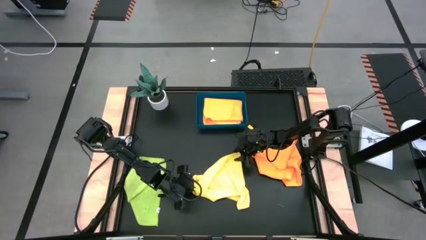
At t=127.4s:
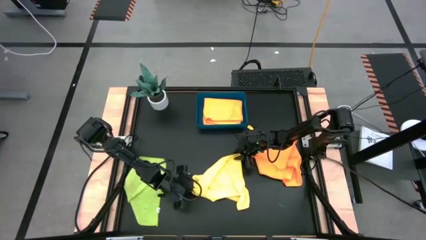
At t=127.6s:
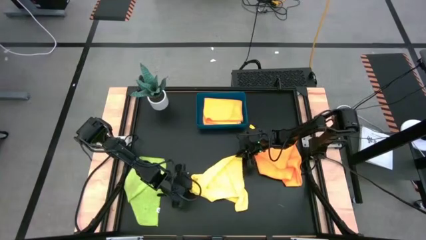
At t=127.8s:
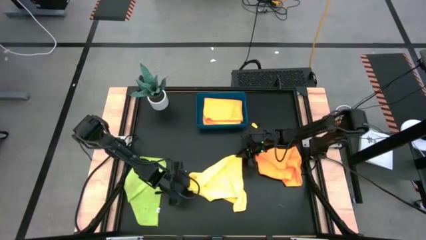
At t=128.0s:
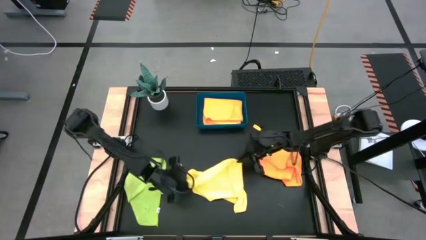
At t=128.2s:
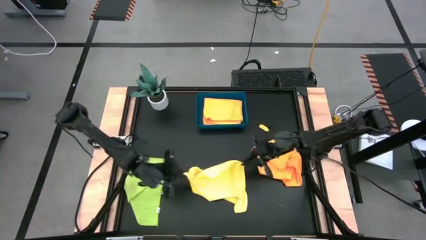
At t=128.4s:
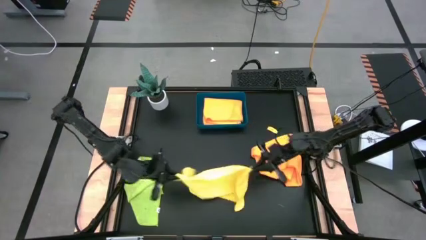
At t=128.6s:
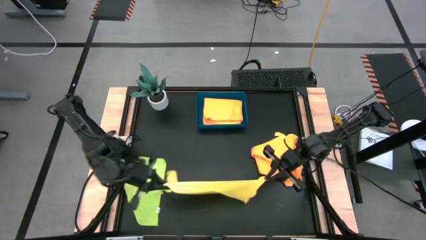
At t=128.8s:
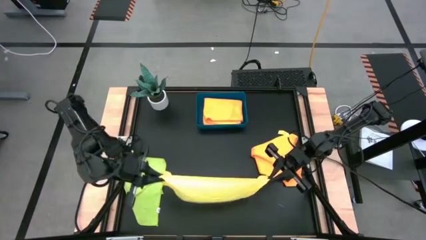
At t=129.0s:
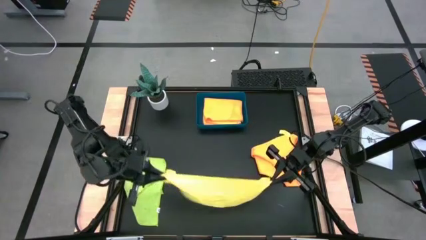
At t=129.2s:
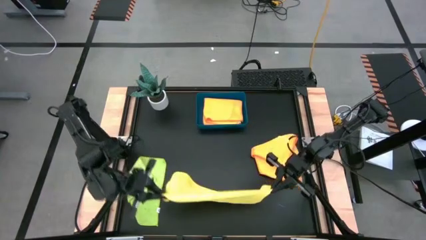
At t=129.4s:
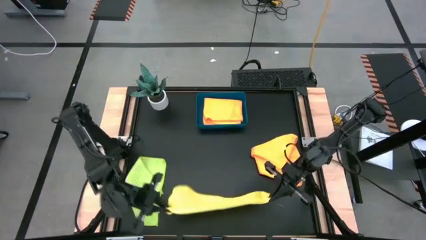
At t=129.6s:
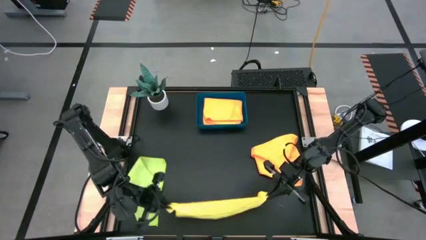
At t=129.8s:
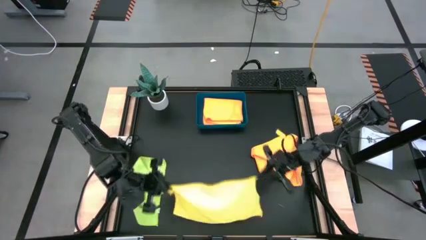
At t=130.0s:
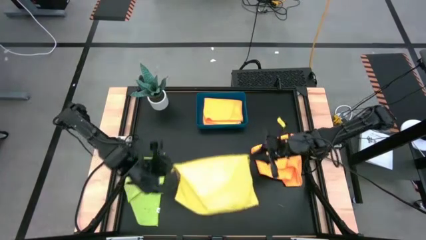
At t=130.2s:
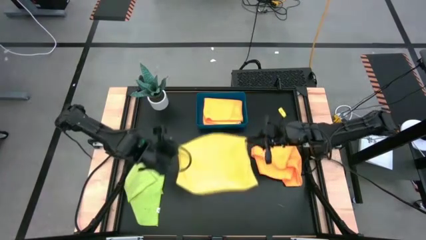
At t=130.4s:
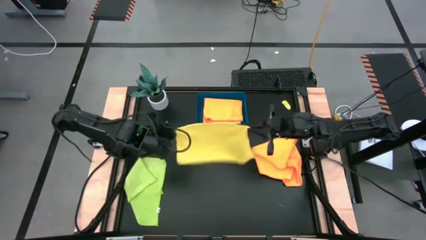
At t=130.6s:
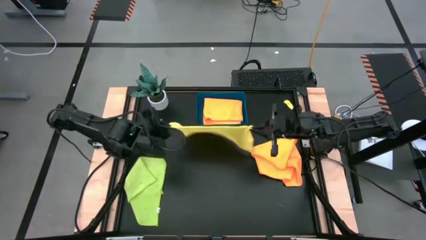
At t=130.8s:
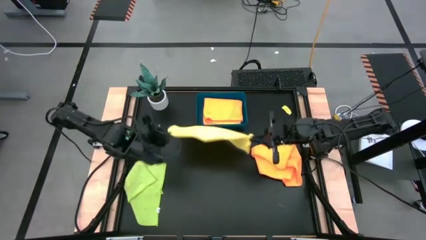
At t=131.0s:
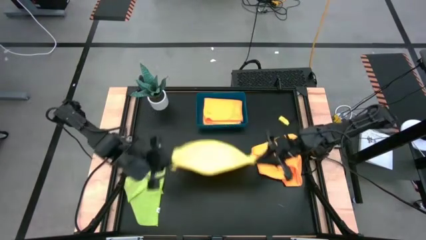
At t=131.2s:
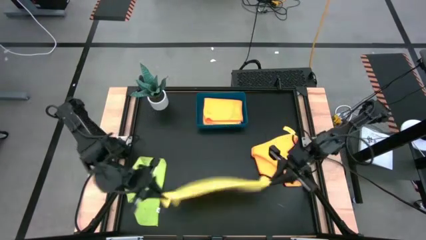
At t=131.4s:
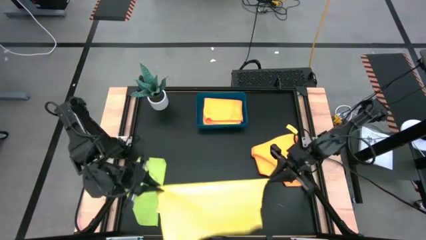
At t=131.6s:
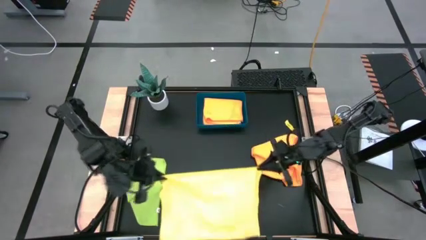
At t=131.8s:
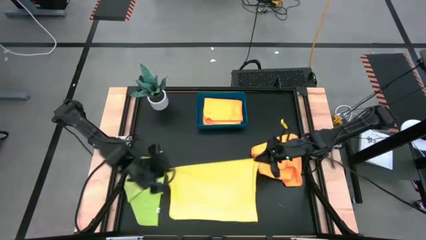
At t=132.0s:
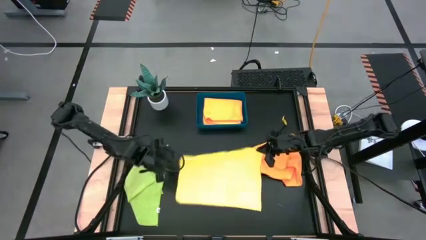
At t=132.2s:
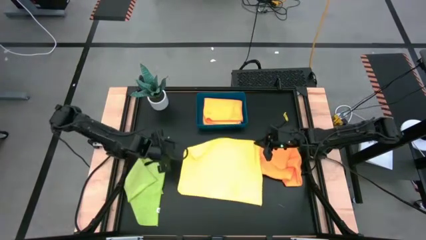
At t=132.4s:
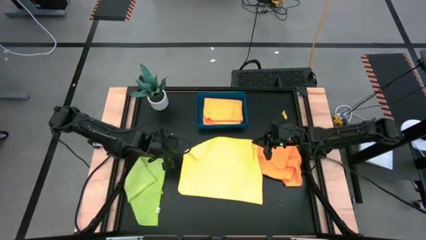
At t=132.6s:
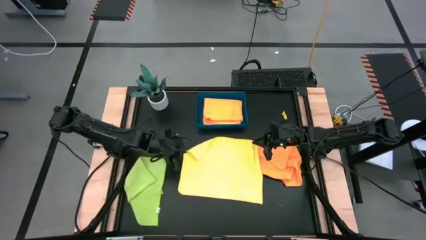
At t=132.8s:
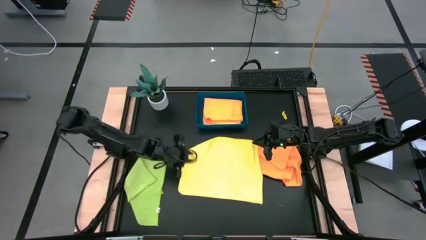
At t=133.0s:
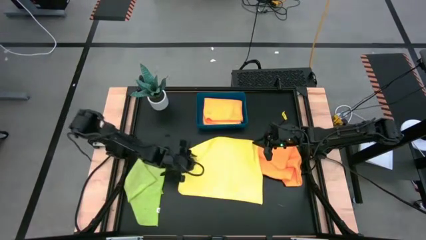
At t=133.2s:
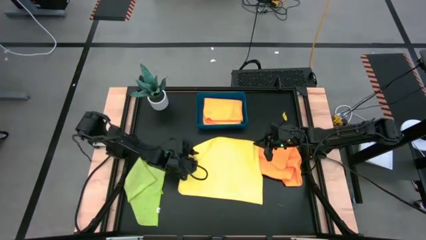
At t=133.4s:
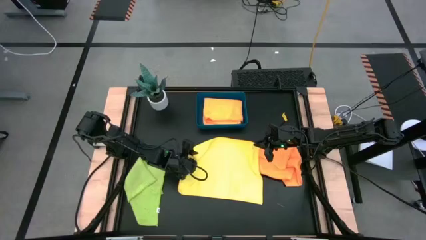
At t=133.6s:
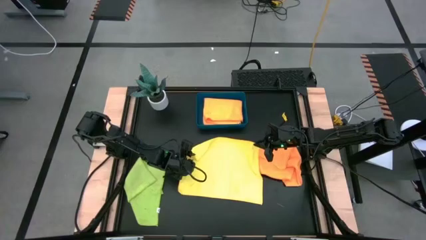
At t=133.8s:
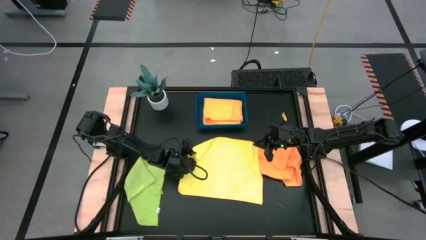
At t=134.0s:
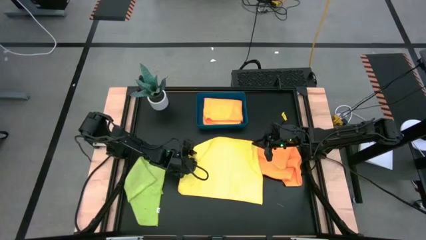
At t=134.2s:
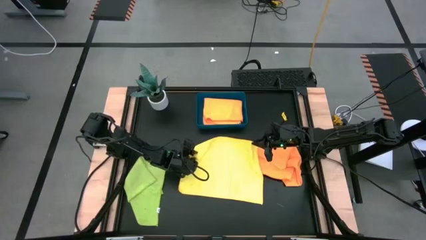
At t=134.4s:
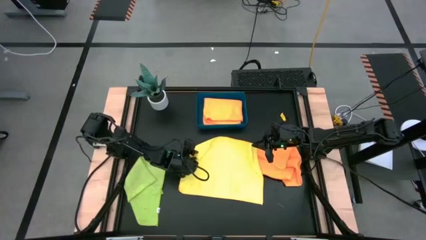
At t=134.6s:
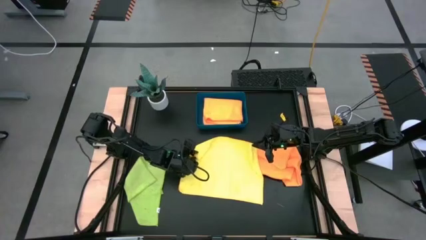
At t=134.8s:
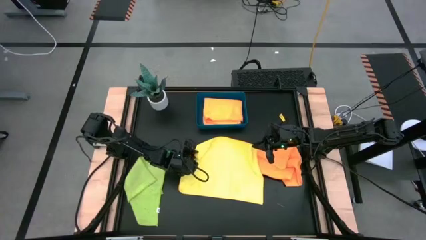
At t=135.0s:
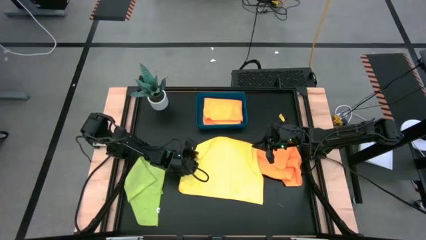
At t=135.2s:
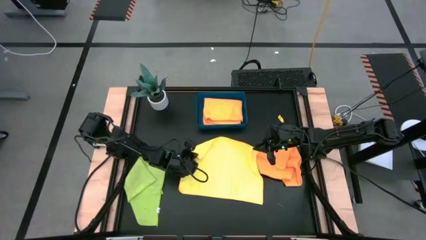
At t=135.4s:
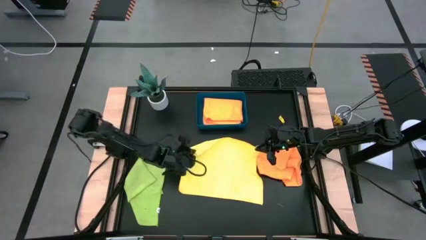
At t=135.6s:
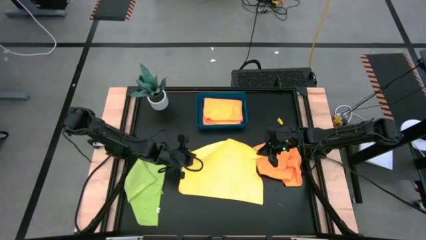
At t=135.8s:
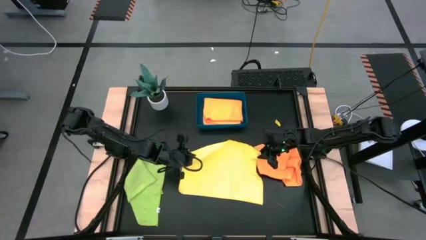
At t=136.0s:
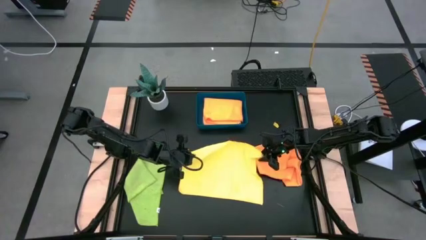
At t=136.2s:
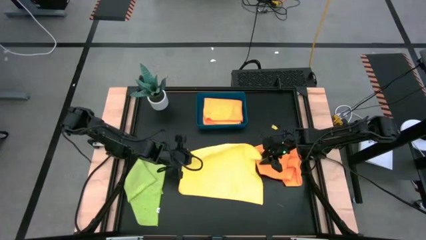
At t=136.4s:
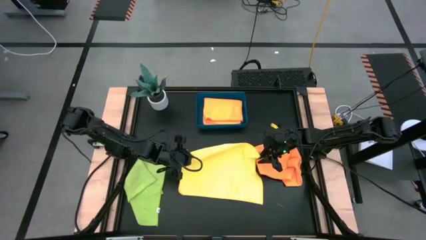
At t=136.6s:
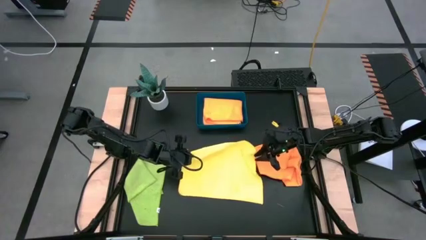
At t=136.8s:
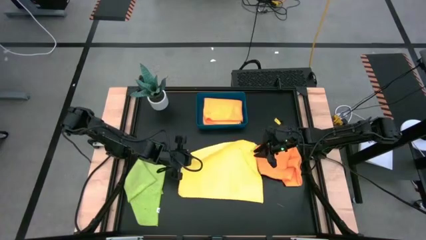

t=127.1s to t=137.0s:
Task: Fold microfiber towels
Fold the yellow microfiber cloth
